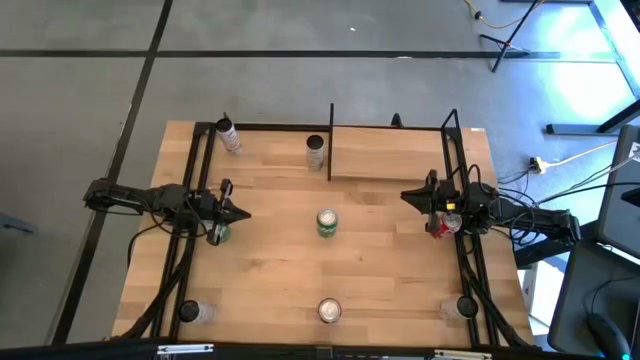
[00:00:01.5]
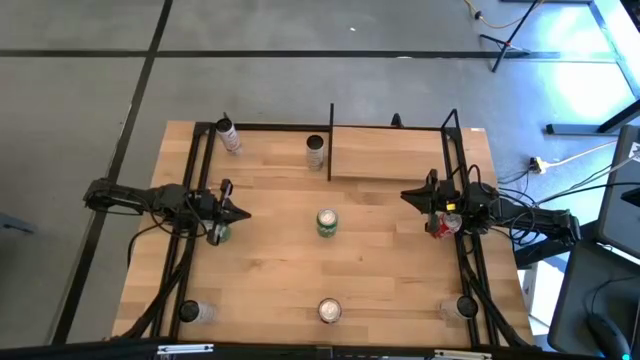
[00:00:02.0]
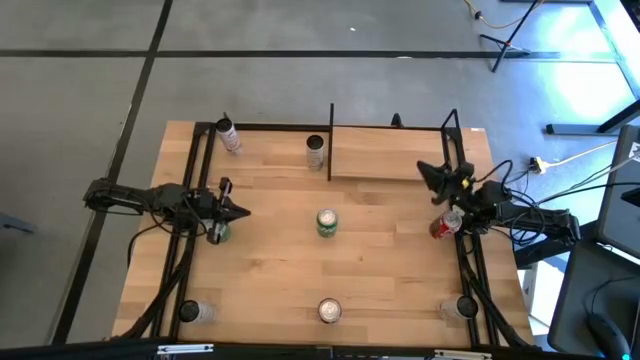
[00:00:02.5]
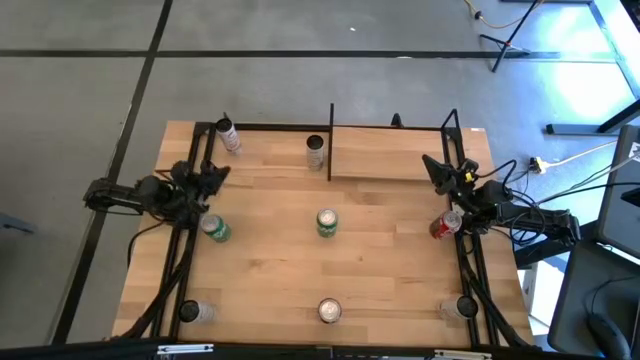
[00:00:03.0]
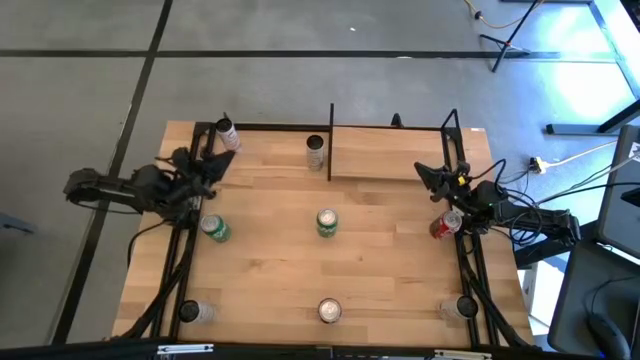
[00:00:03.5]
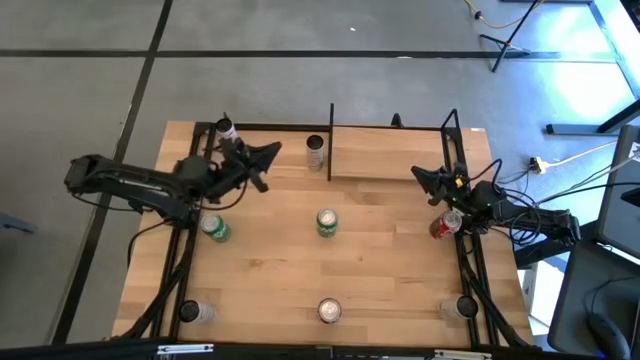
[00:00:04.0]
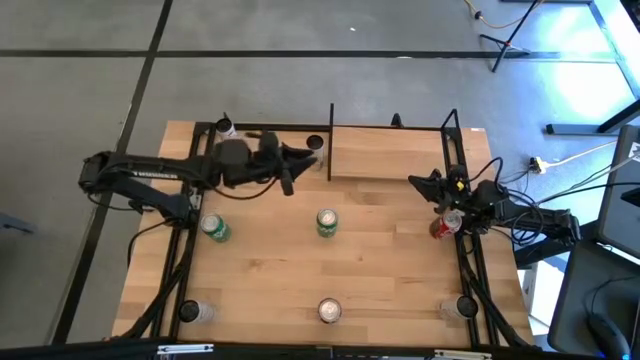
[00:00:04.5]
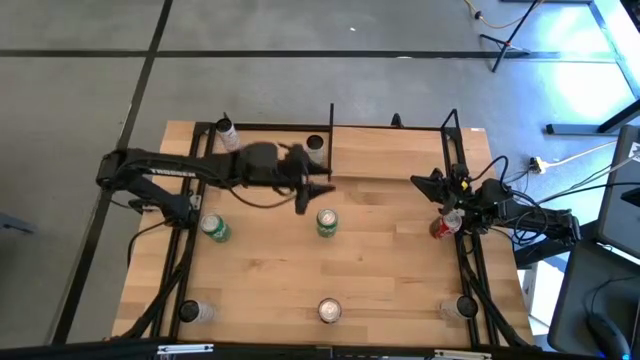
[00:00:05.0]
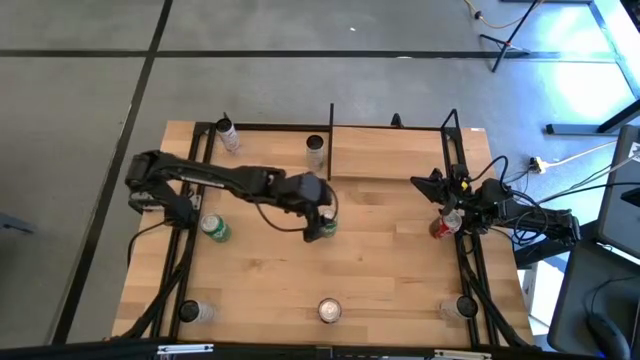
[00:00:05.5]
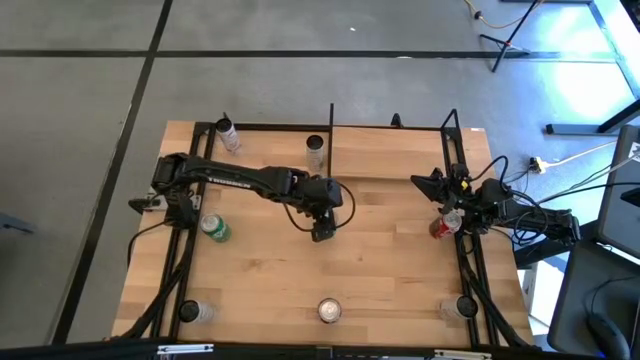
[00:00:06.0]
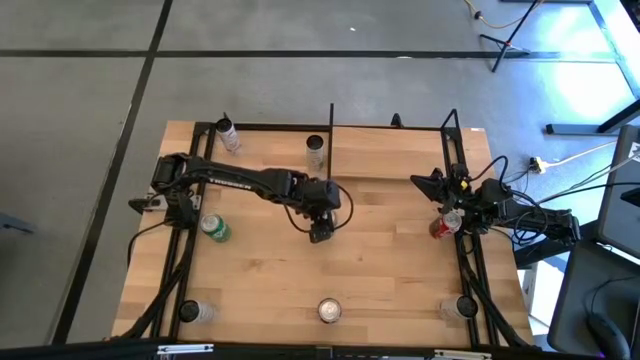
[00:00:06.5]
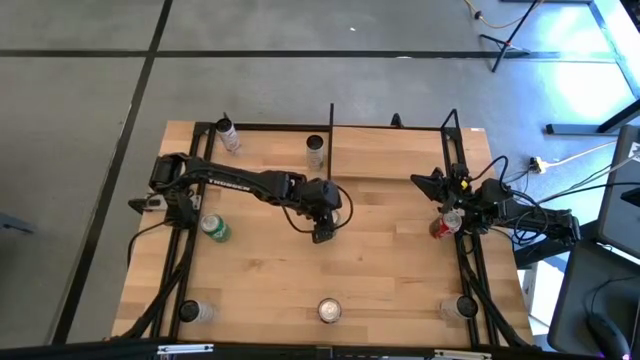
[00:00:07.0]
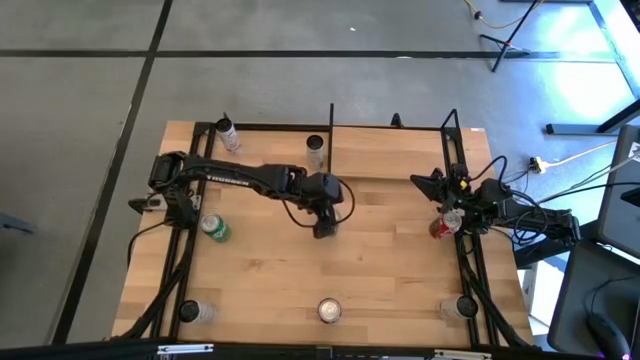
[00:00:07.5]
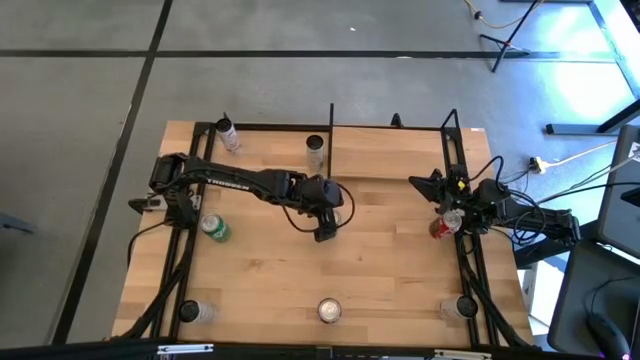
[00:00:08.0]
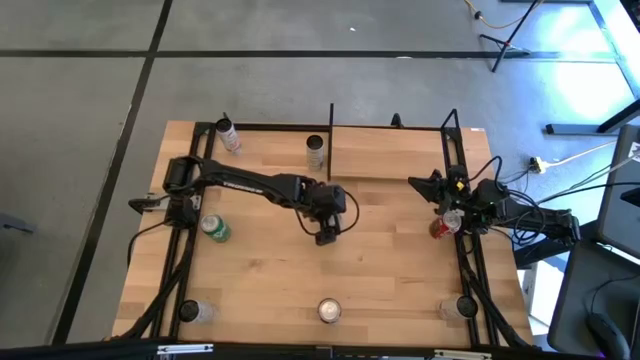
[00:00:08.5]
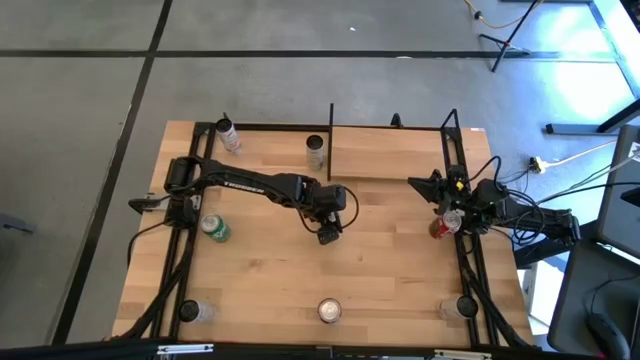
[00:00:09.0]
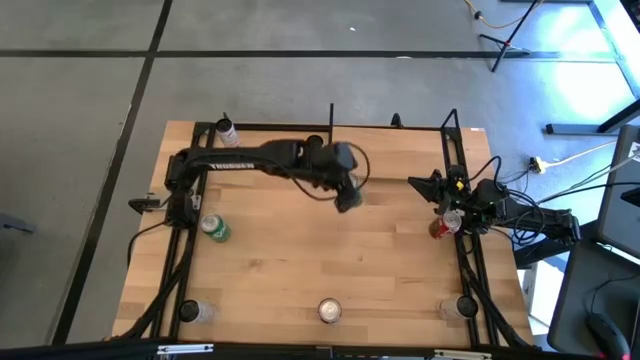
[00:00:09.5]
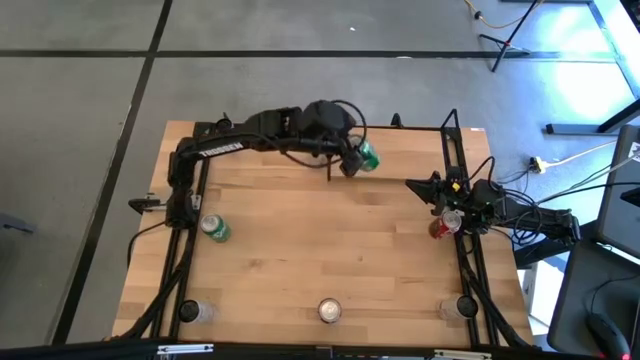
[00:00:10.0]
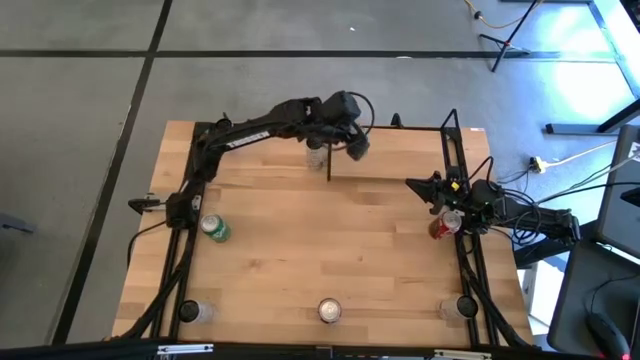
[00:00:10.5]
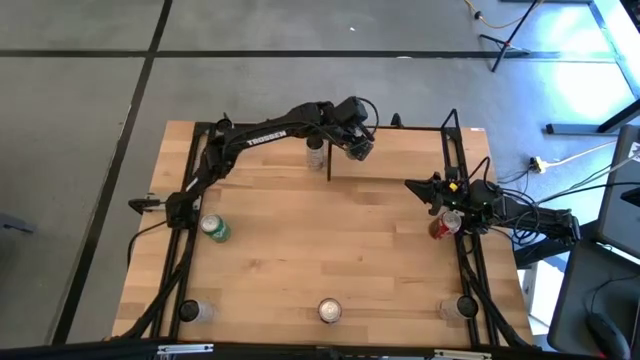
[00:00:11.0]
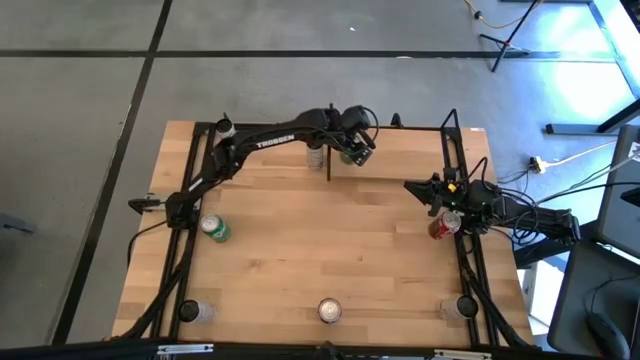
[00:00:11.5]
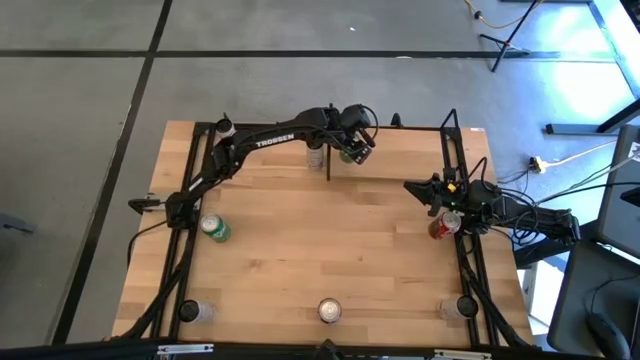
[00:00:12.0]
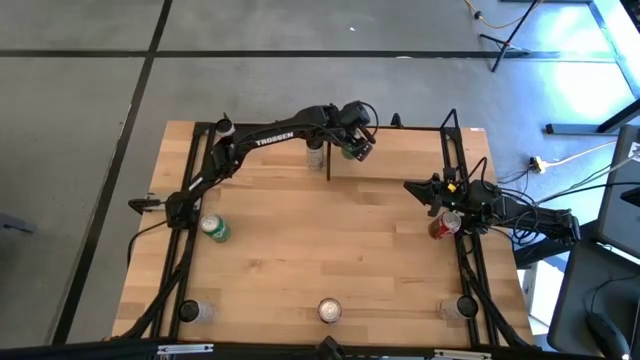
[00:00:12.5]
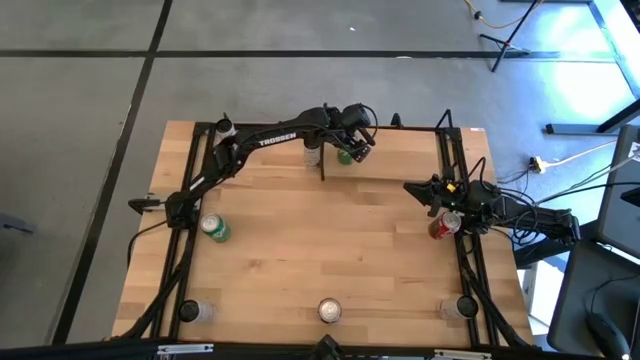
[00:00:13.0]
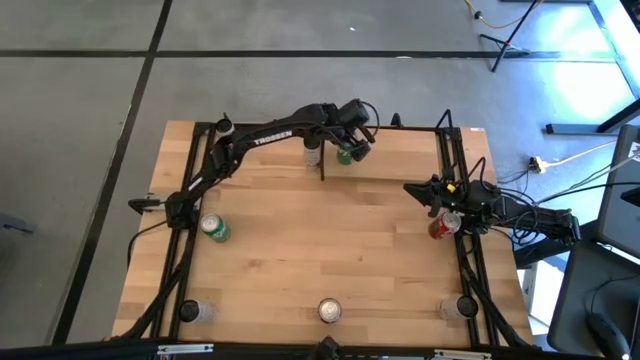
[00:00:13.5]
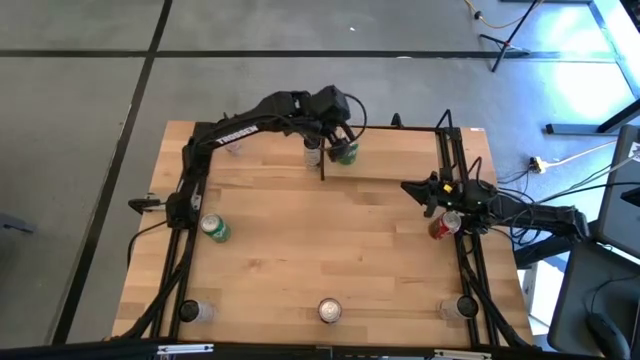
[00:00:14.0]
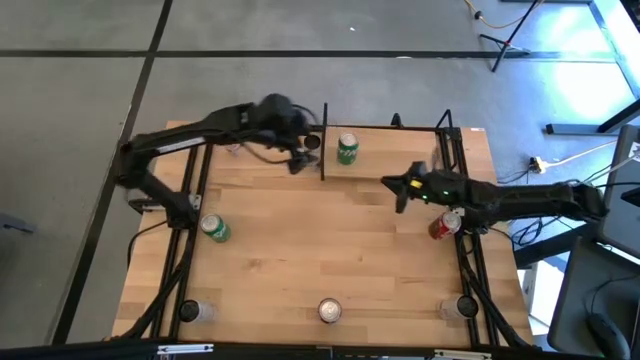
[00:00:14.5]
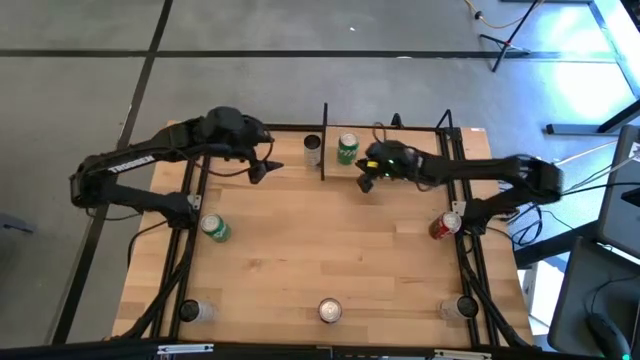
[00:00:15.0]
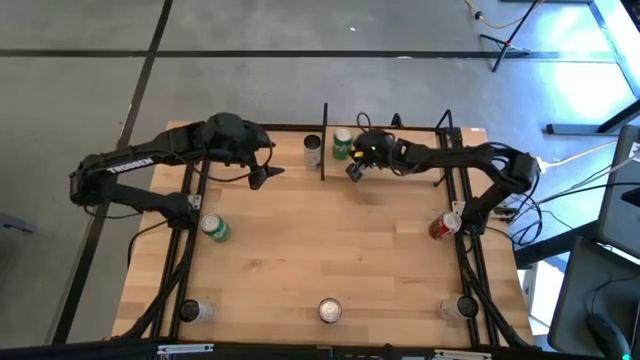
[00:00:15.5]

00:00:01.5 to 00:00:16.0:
Task: Place canned beverage on shelf
Put the right green soda can on the shelf

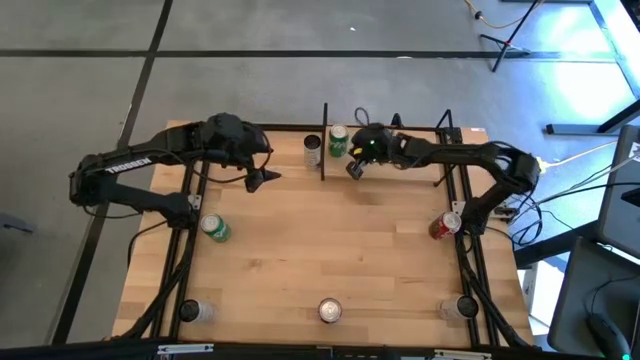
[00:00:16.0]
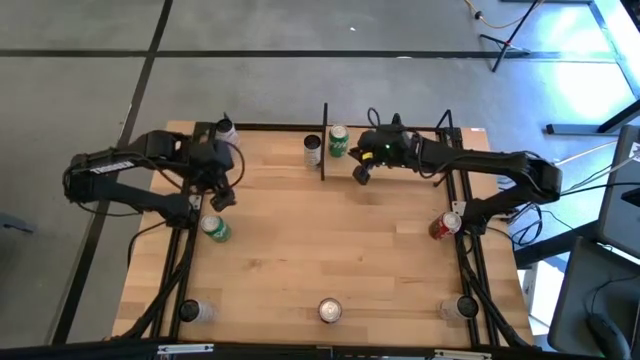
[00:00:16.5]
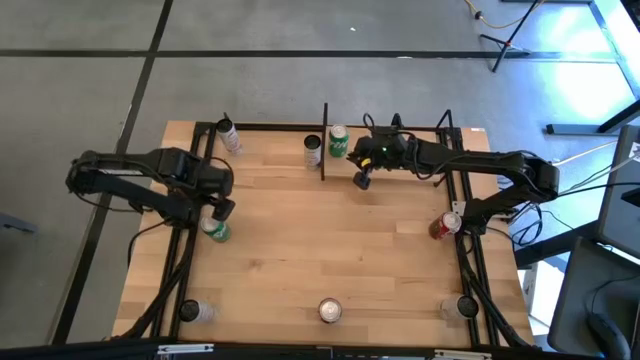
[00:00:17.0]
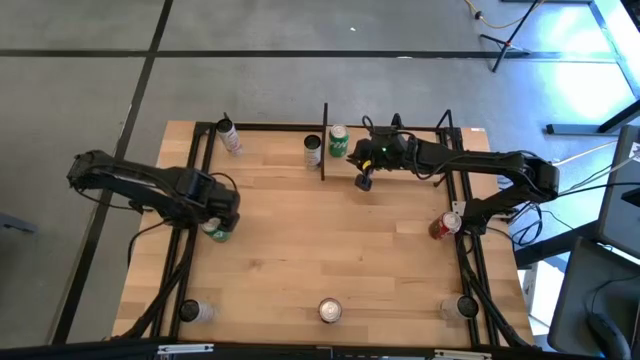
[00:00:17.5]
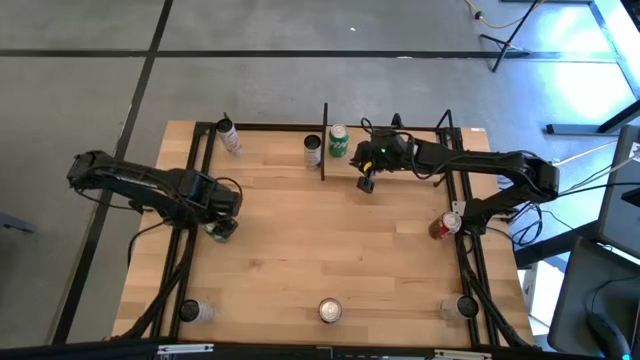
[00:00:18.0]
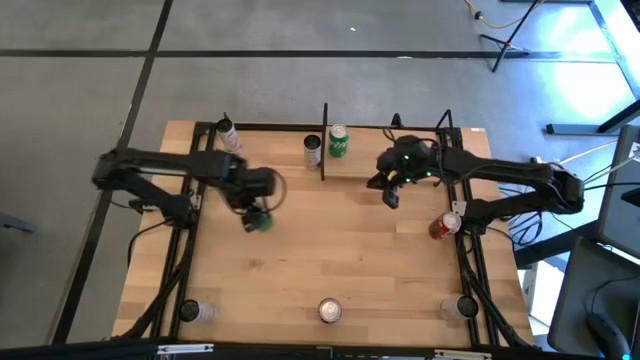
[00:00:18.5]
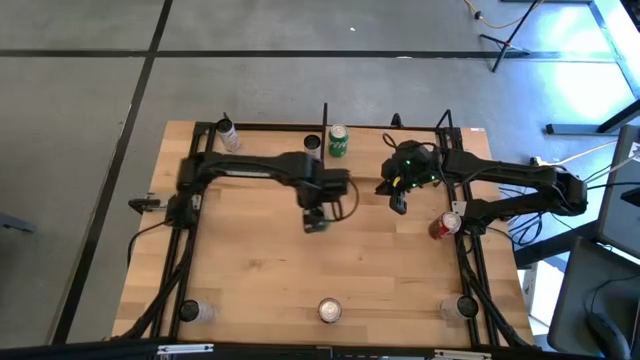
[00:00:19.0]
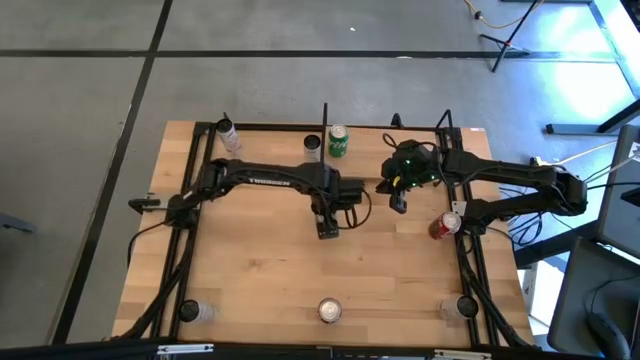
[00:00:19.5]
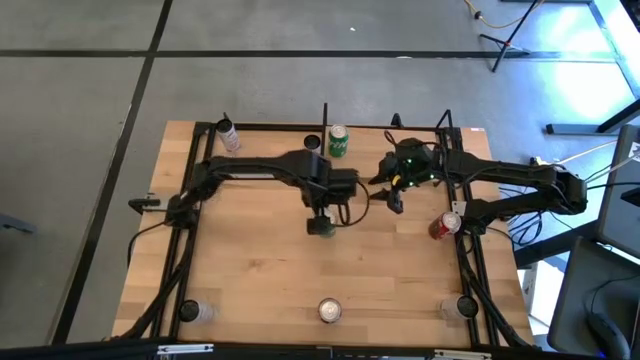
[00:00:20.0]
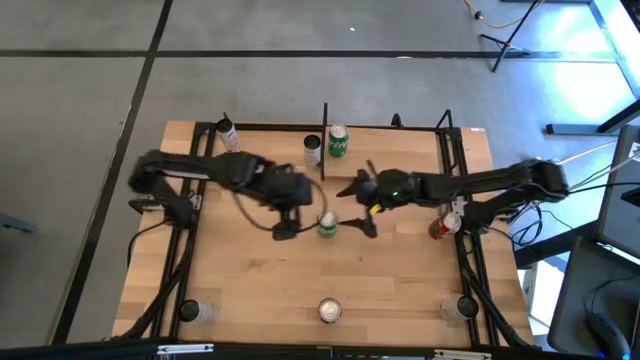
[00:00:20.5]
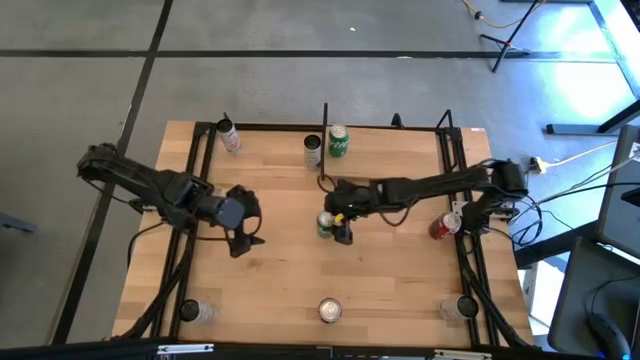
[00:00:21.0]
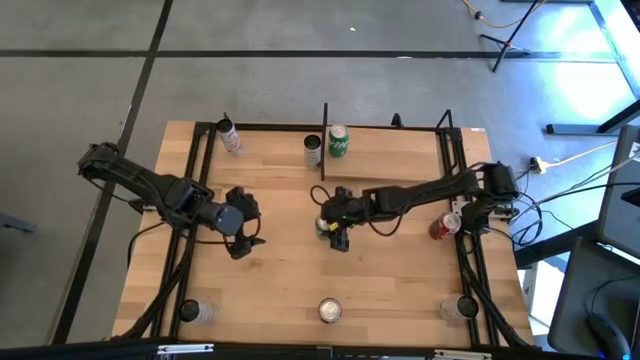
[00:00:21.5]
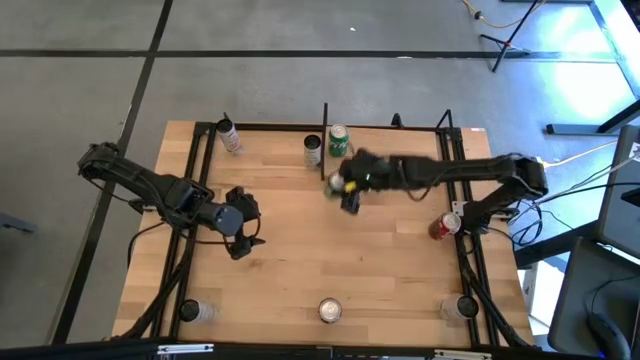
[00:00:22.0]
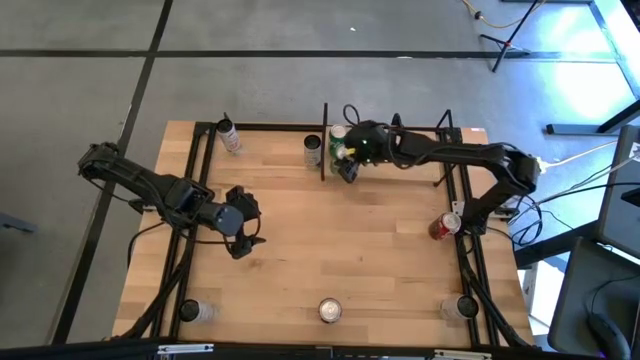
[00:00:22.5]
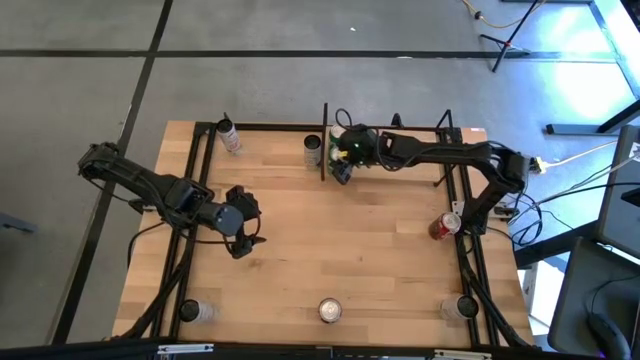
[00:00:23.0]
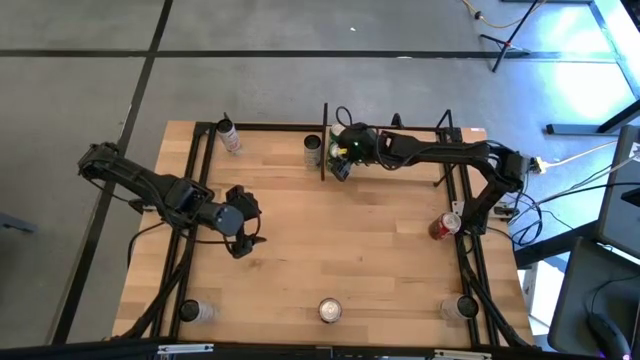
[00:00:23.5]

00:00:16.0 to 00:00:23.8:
Put the green soda can on the shelf aligned with the other green soda can
